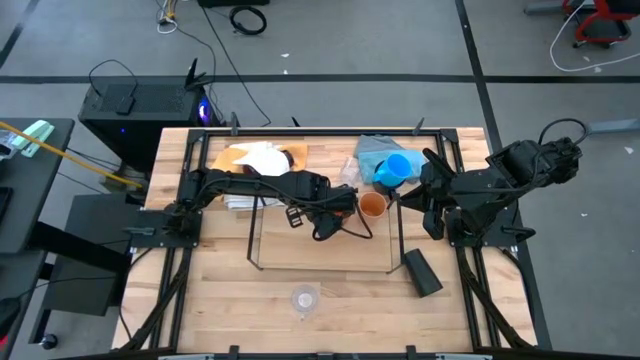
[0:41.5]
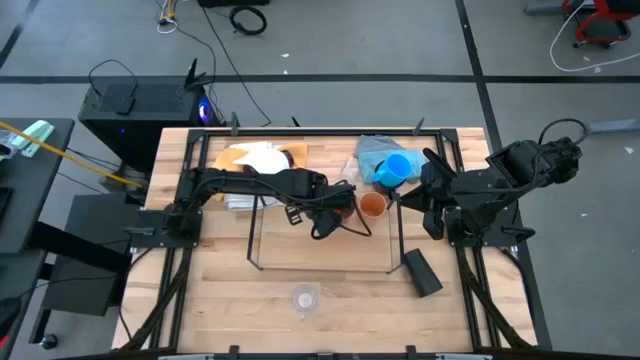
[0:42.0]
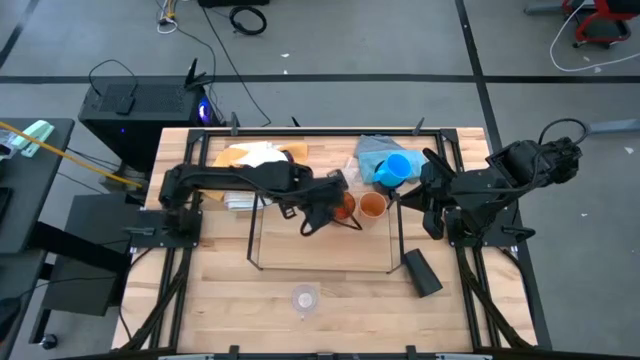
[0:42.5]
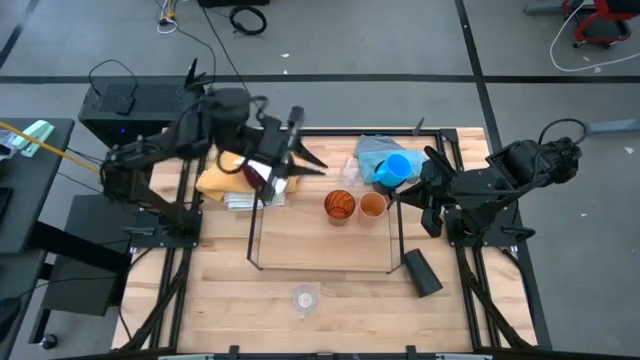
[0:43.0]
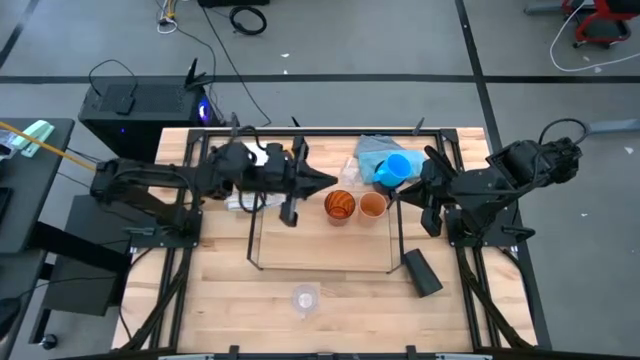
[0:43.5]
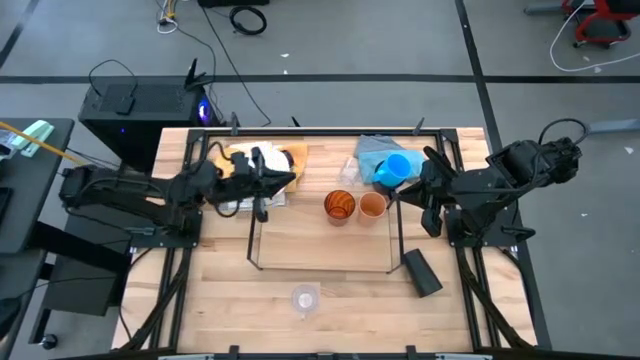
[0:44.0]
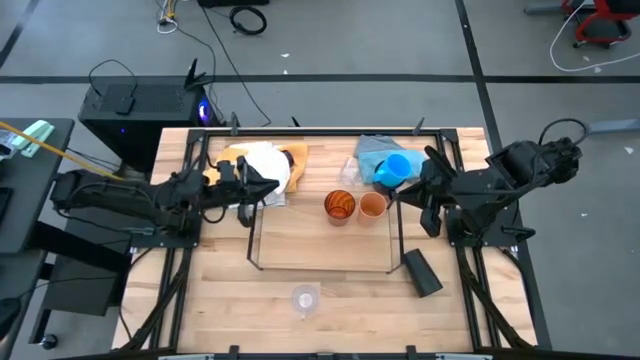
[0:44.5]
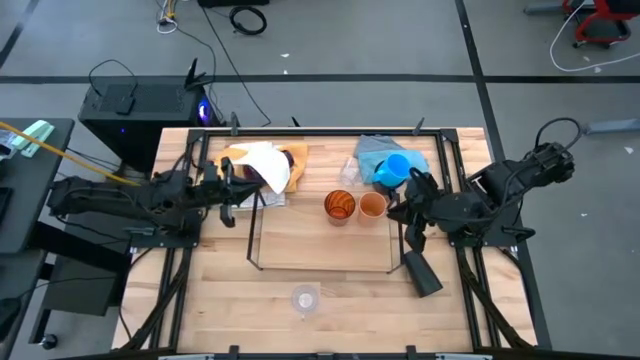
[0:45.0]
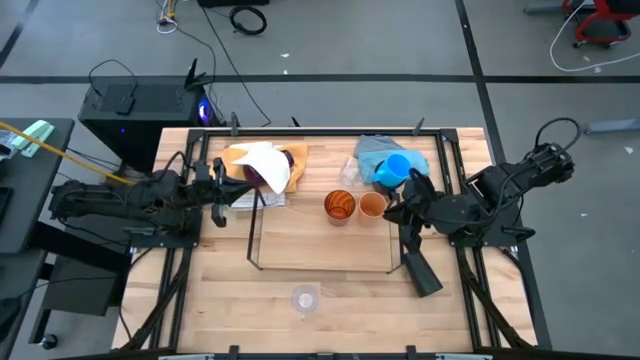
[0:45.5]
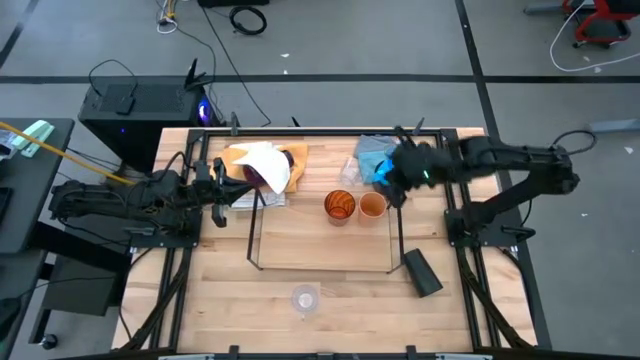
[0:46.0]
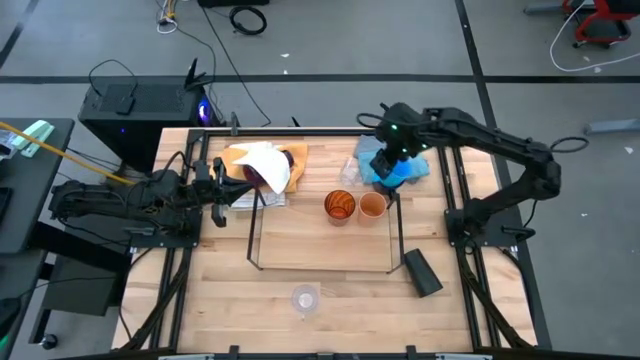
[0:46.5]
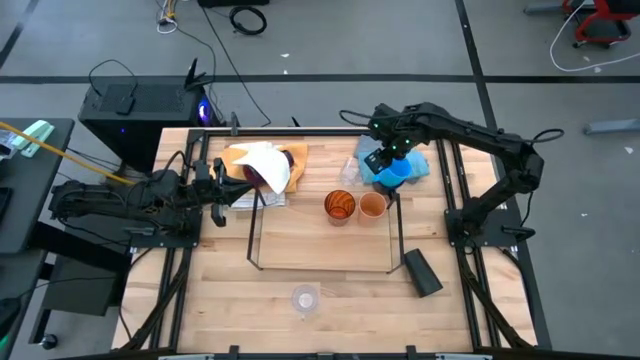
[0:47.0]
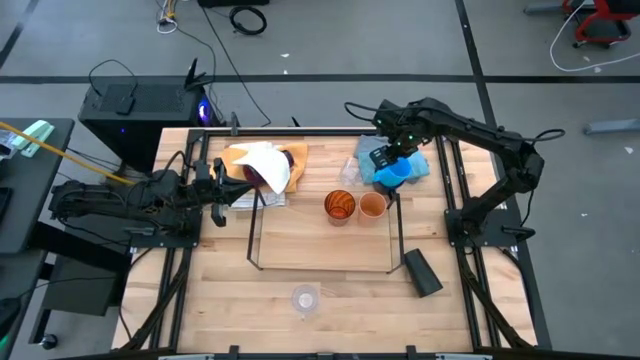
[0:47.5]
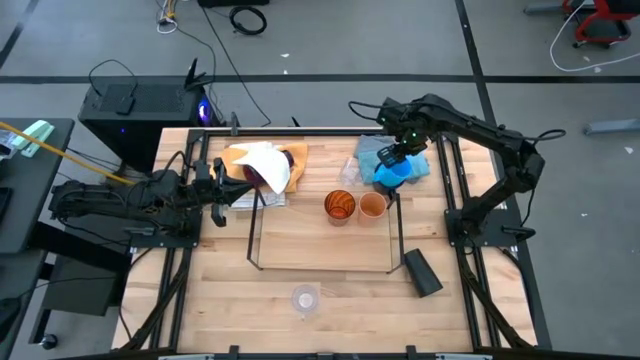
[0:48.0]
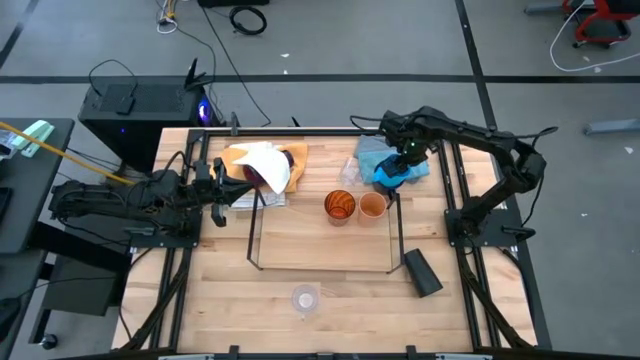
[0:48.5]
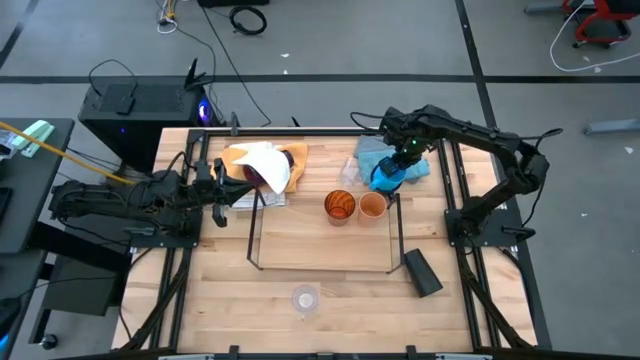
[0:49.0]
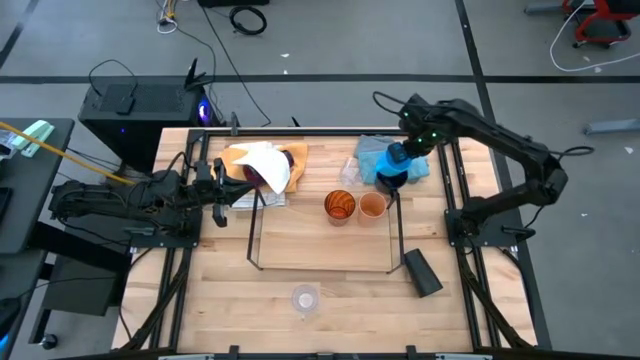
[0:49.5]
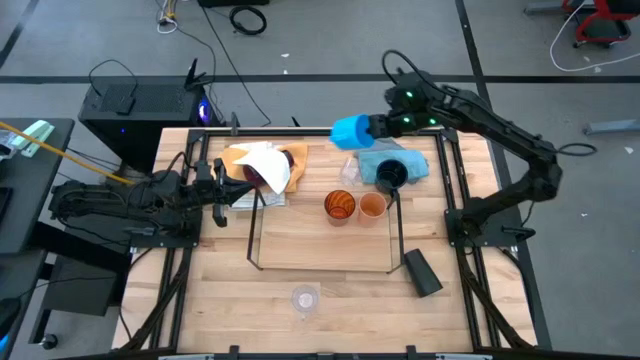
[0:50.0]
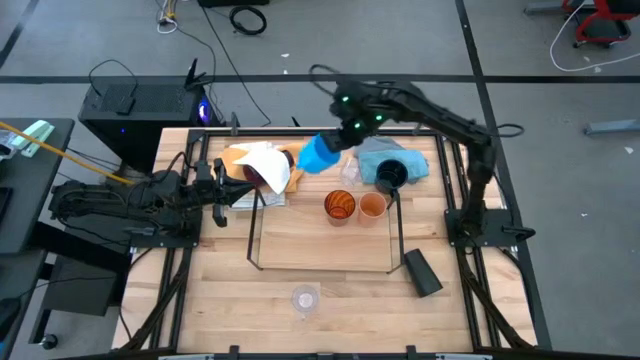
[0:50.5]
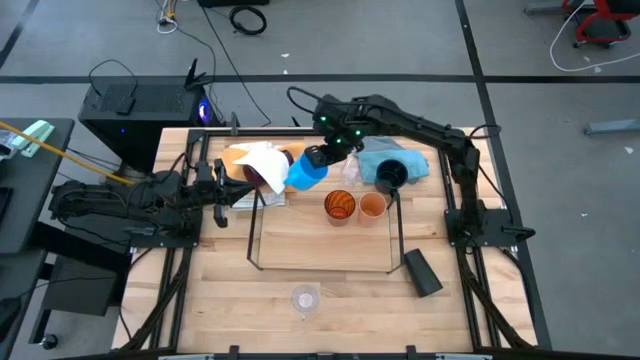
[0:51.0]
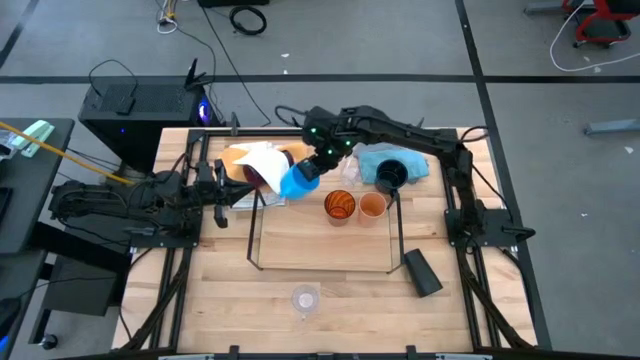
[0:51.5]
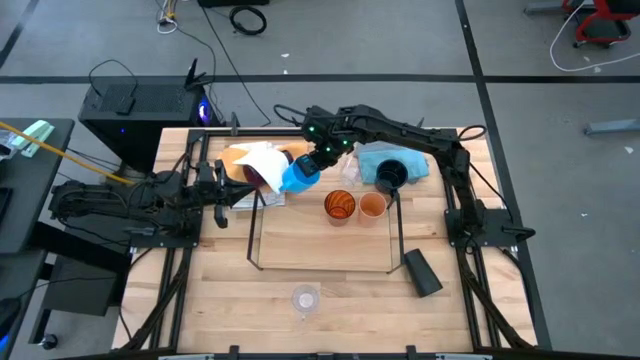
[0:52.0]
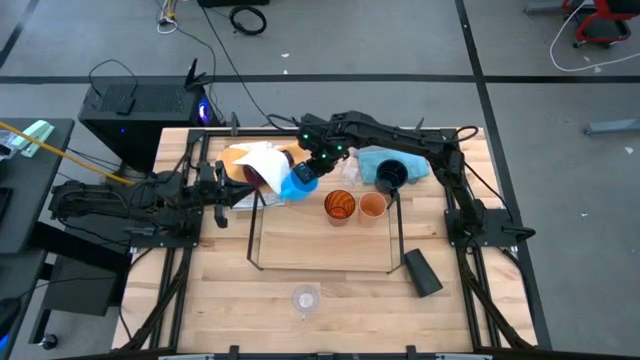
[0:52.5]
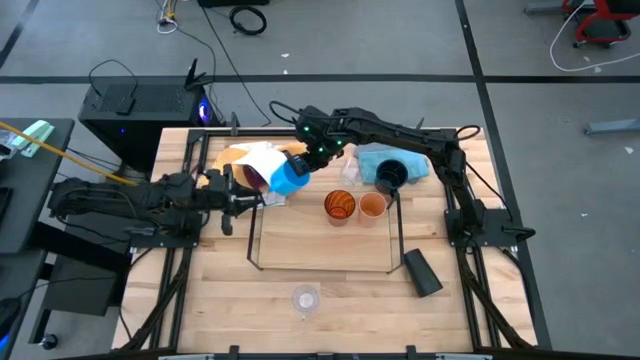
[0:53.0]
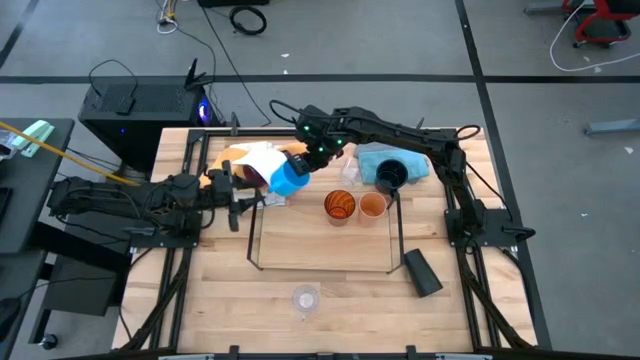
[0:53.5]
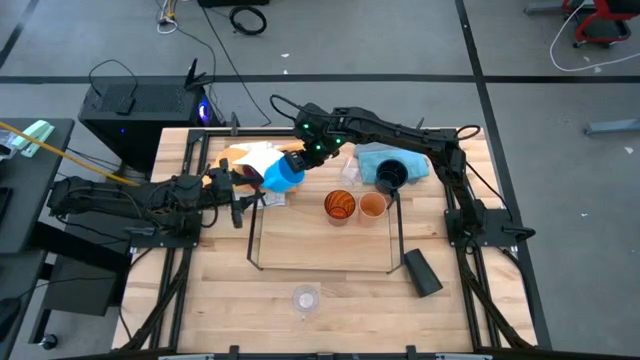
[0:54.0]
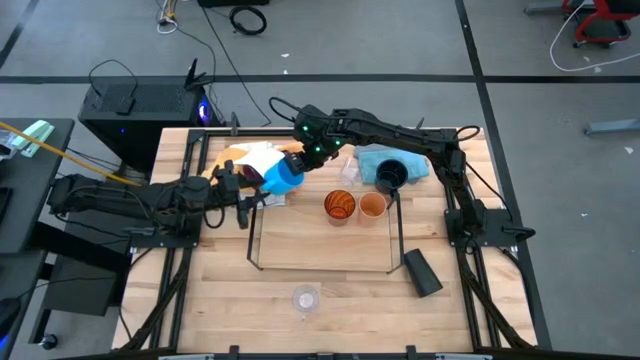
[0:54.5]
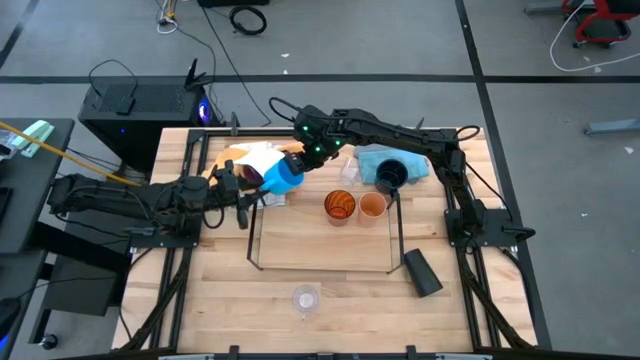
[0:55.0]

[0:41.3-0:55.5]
Task: Stack small to large cups/mugs on shelf
Put the blue mug on the shelf

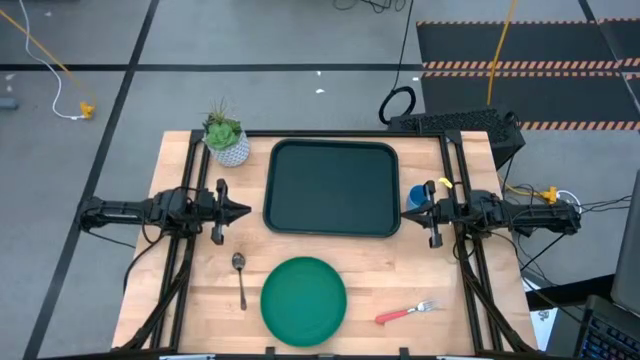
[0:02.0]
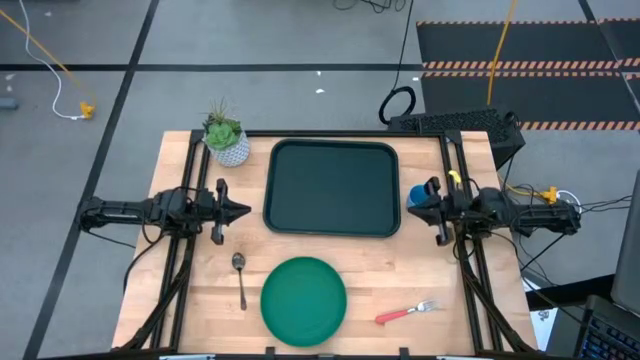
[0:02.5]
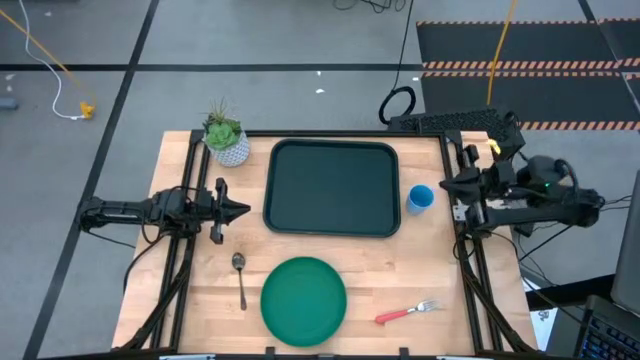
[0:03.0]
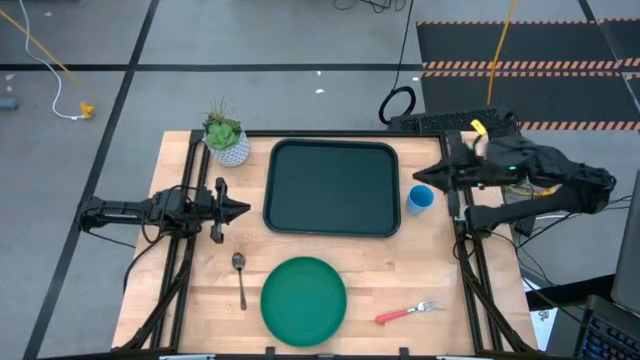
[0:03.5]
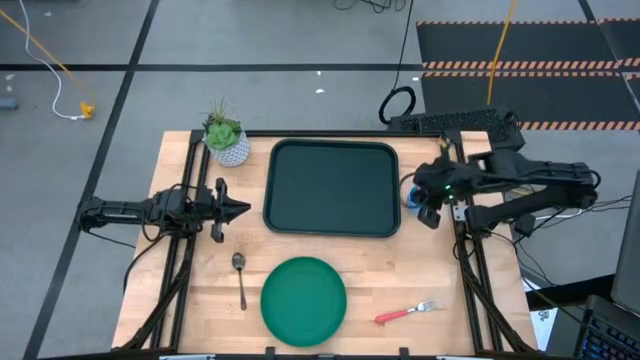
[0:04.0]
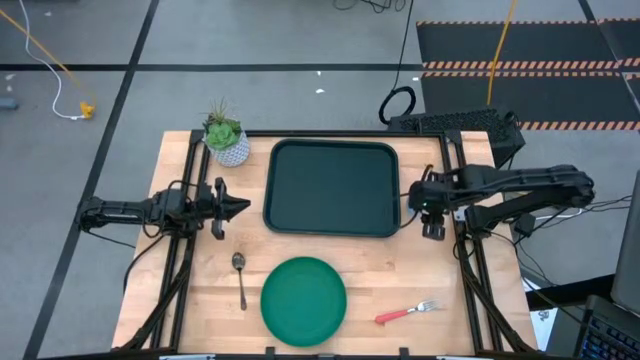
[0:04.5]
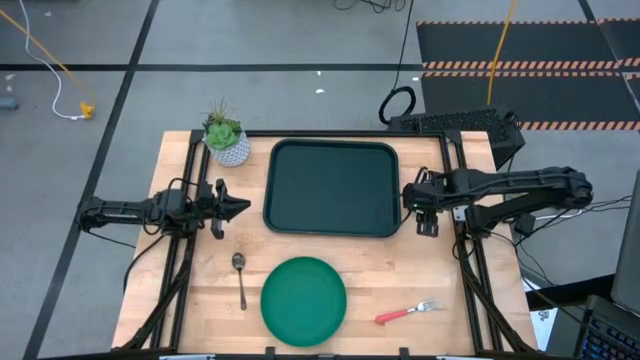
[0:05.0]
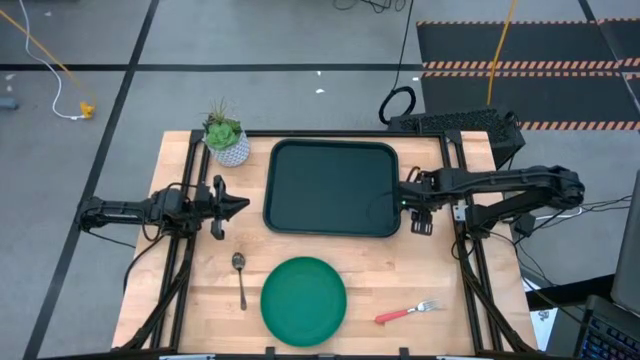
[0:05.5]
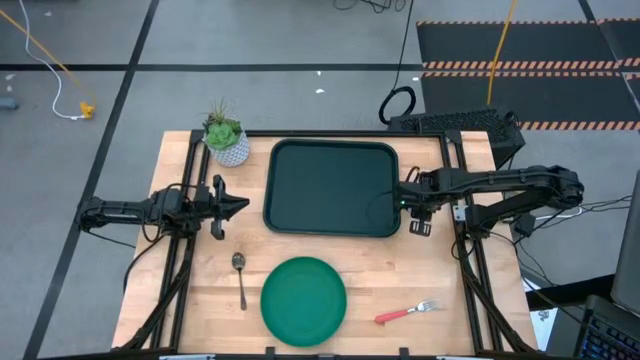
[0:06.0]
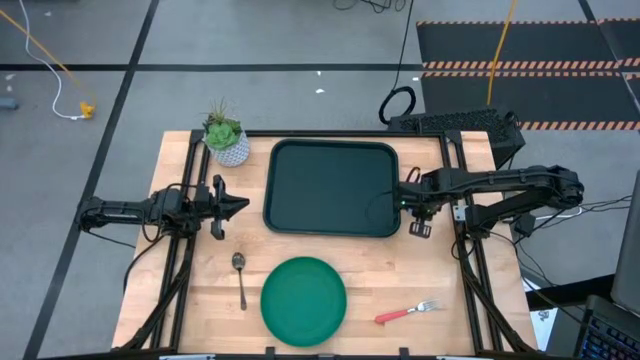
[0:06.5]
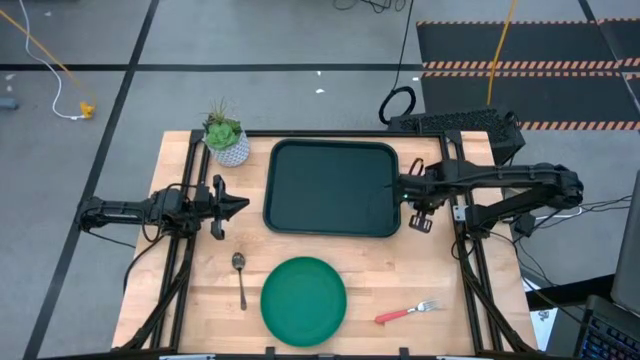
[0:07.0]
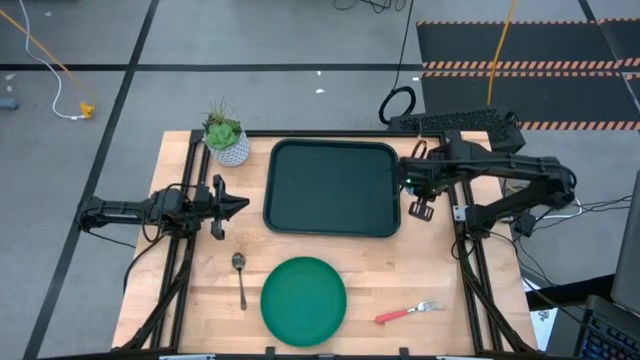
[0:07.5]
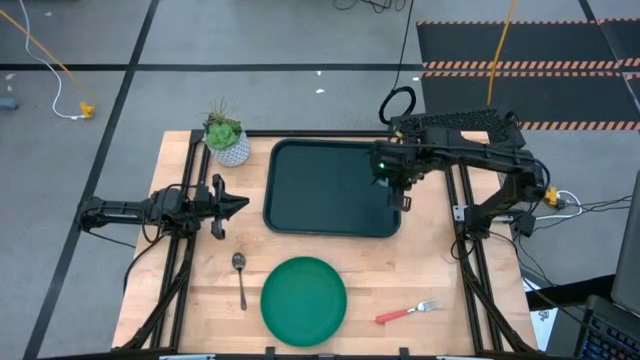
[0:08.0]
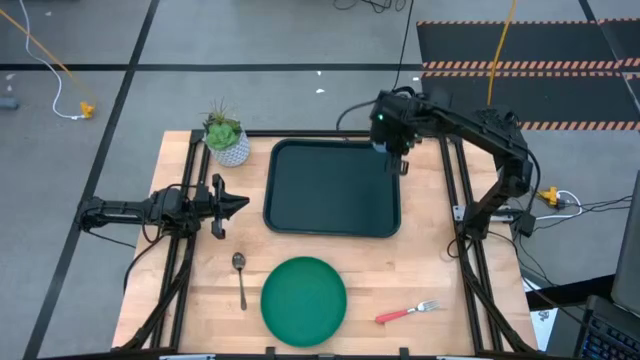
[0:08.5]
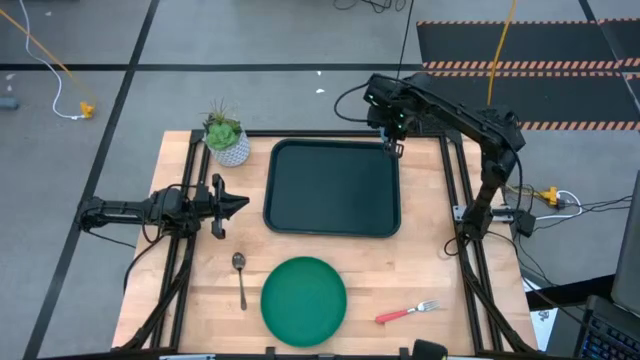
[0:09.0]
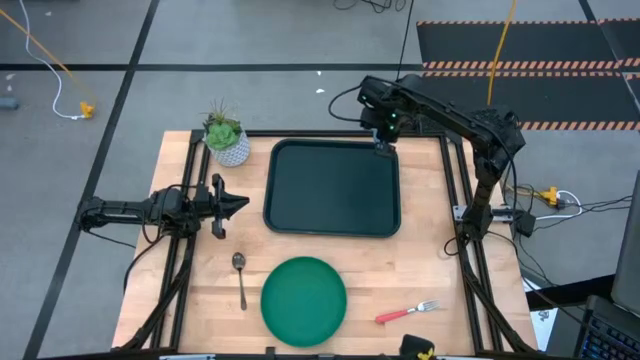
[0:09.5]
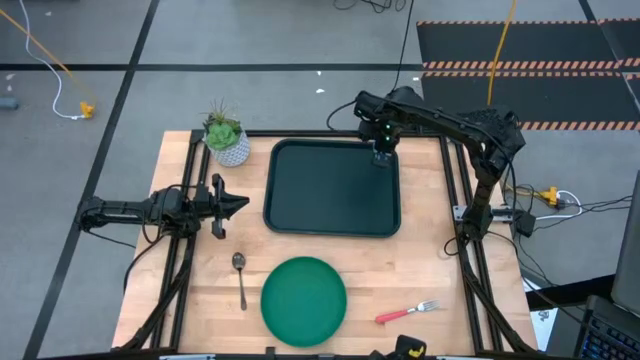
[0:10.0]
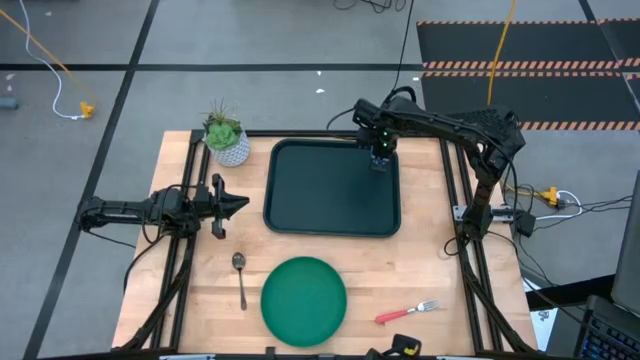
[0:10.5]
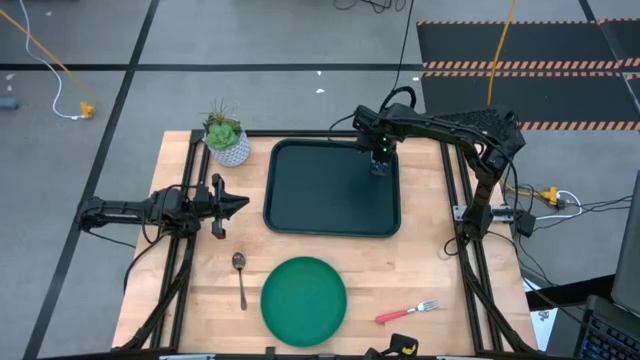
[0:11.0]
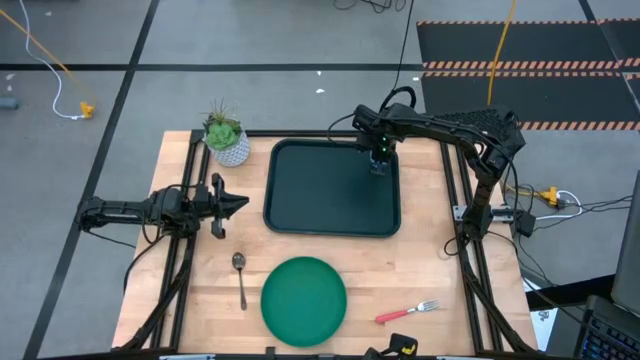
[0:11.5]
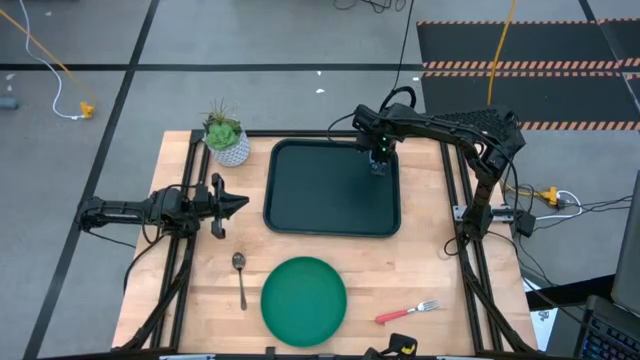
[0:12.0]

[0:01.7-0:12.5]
Task: Pick and place plate/cup/fork/spoon on tray
Put the blue cup on the black tray
